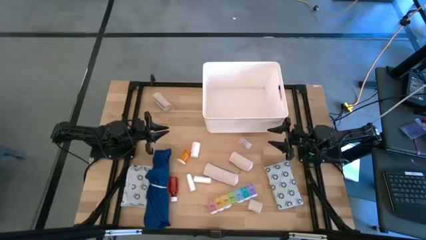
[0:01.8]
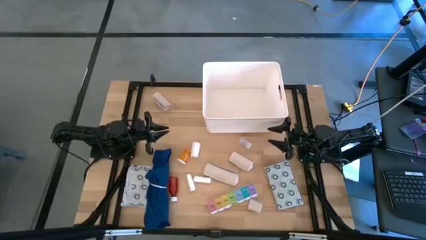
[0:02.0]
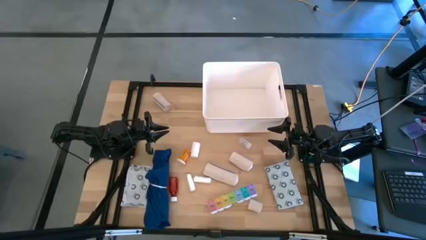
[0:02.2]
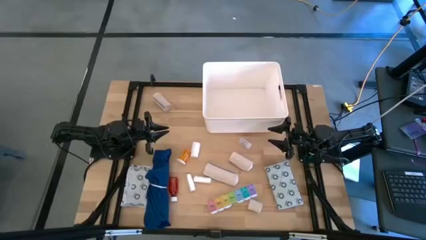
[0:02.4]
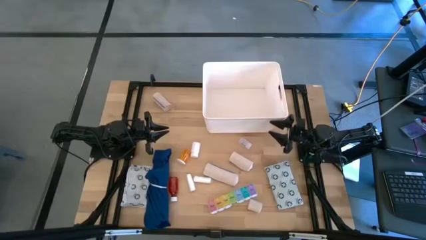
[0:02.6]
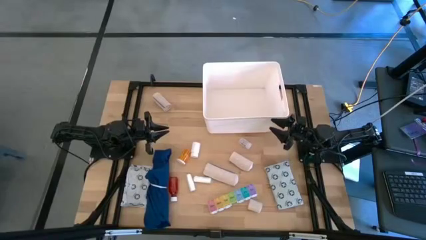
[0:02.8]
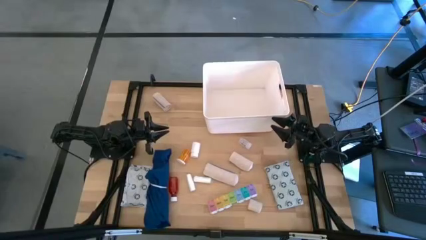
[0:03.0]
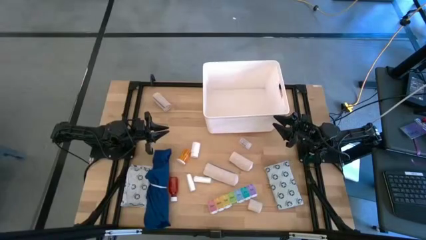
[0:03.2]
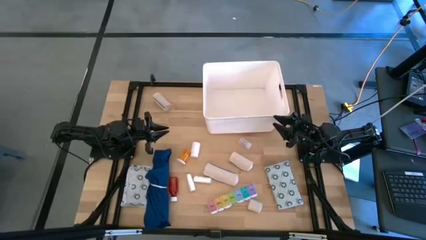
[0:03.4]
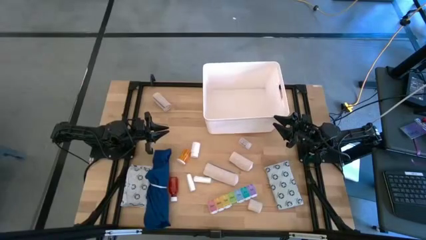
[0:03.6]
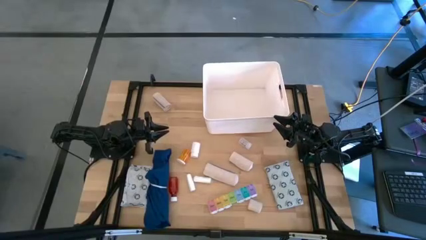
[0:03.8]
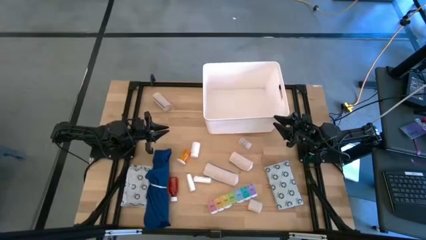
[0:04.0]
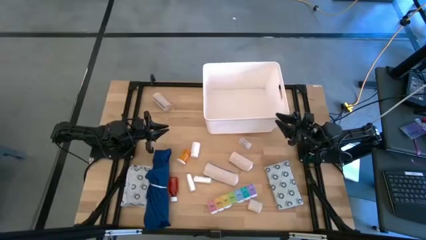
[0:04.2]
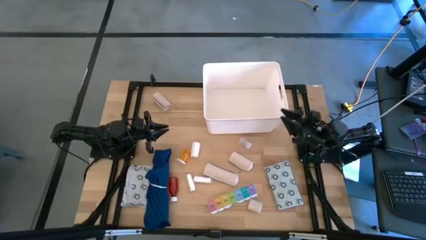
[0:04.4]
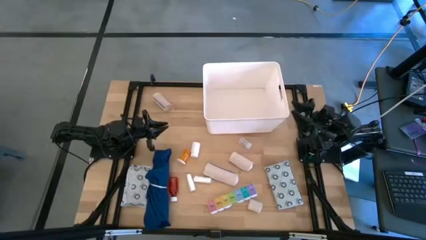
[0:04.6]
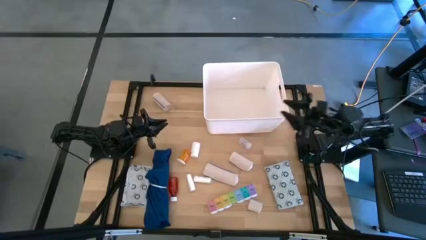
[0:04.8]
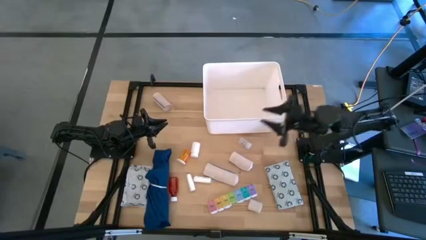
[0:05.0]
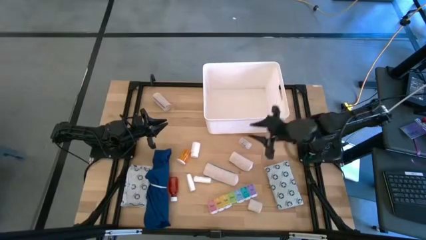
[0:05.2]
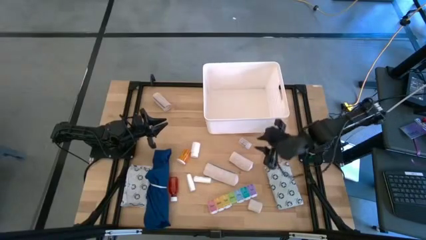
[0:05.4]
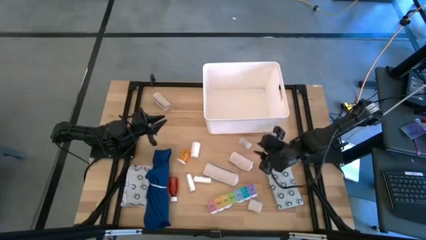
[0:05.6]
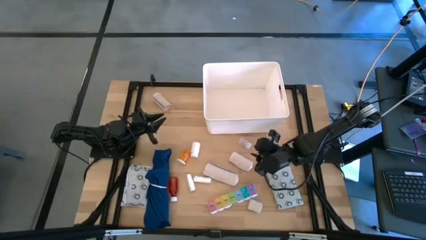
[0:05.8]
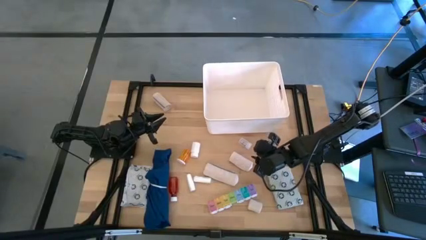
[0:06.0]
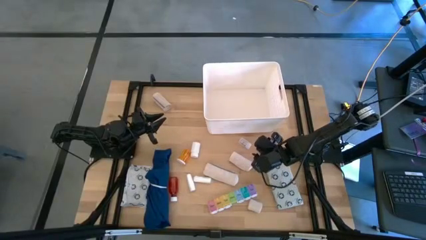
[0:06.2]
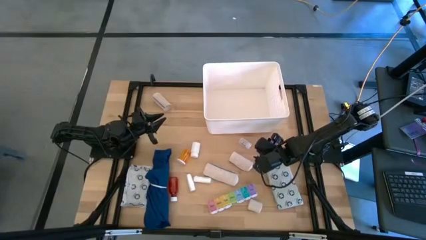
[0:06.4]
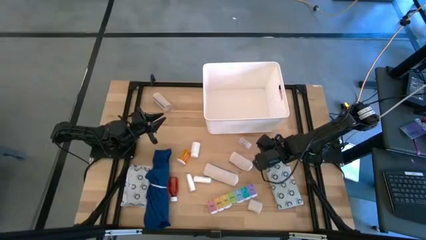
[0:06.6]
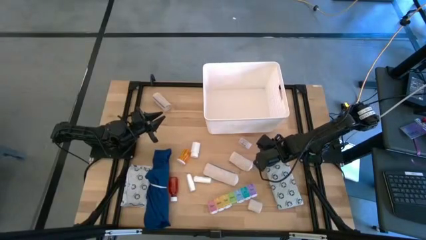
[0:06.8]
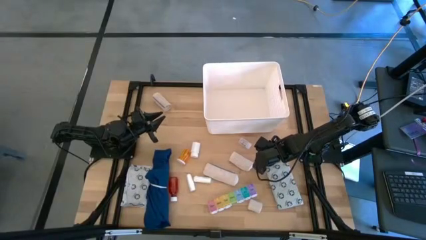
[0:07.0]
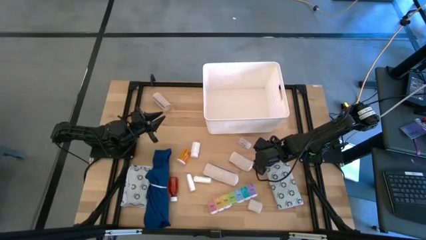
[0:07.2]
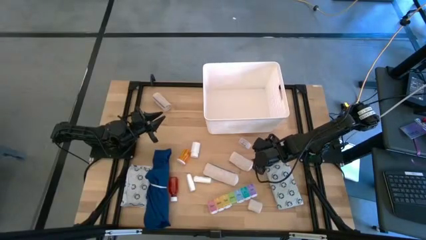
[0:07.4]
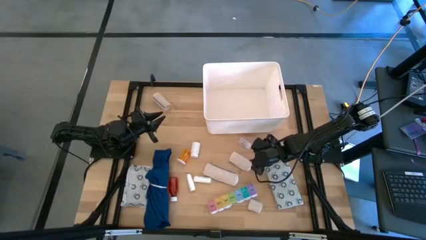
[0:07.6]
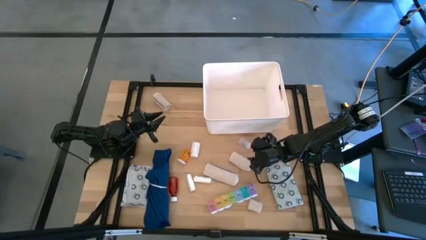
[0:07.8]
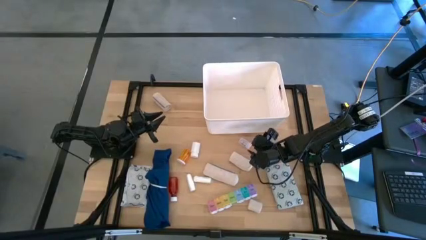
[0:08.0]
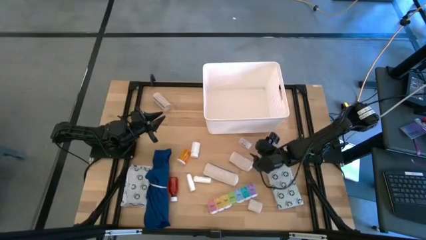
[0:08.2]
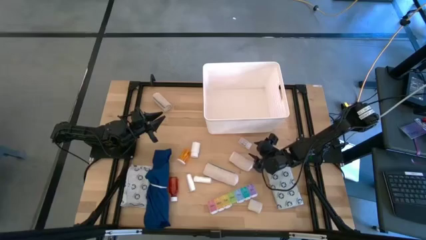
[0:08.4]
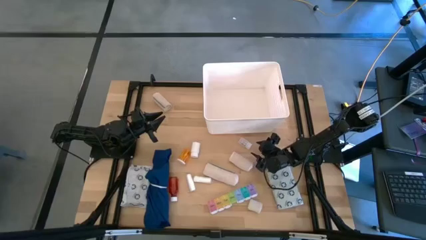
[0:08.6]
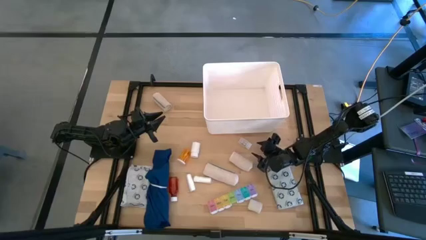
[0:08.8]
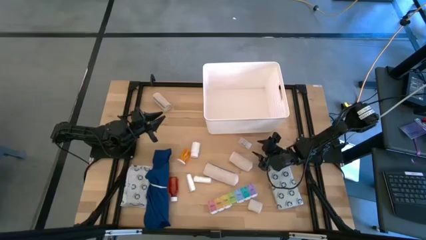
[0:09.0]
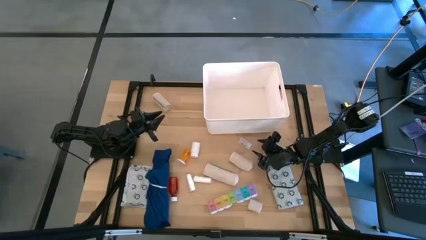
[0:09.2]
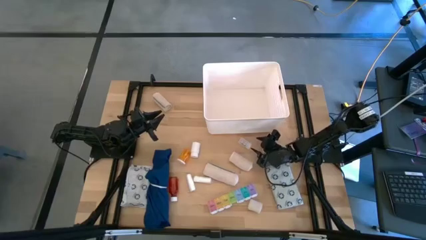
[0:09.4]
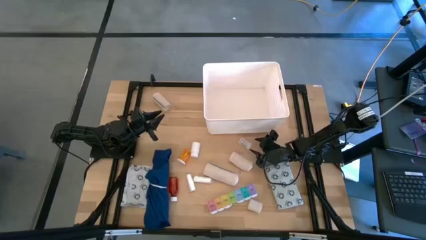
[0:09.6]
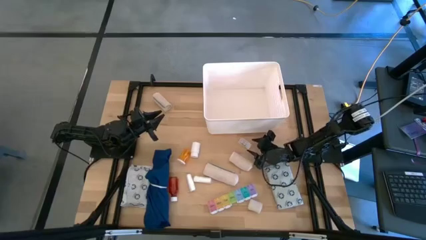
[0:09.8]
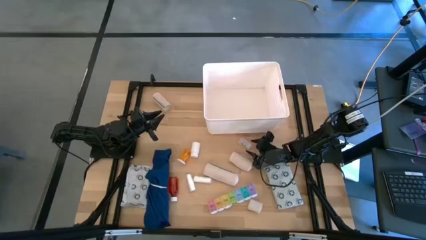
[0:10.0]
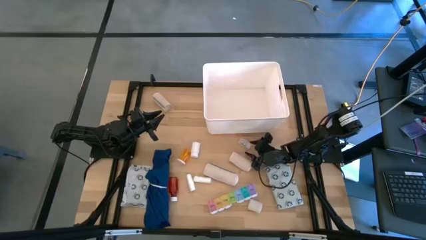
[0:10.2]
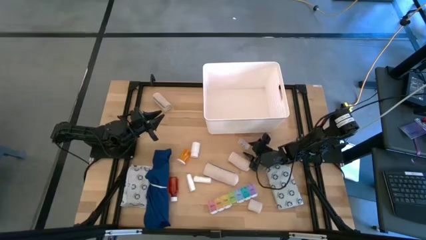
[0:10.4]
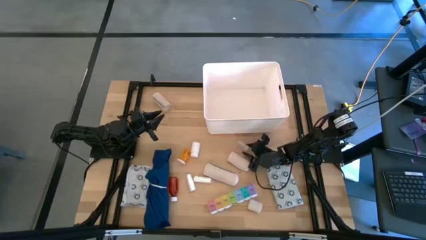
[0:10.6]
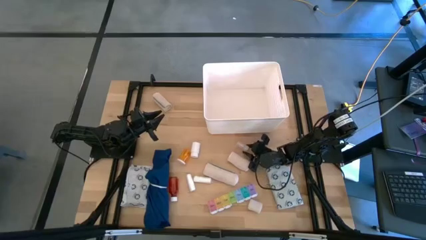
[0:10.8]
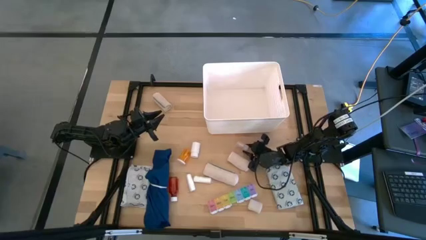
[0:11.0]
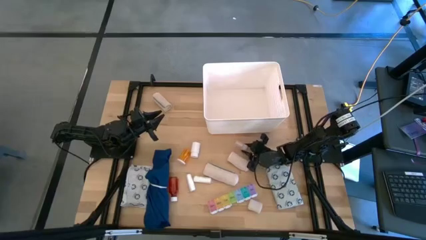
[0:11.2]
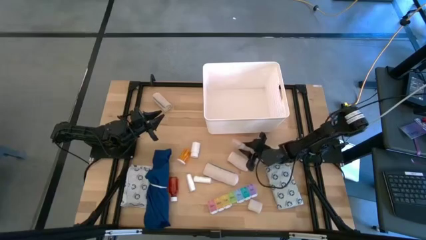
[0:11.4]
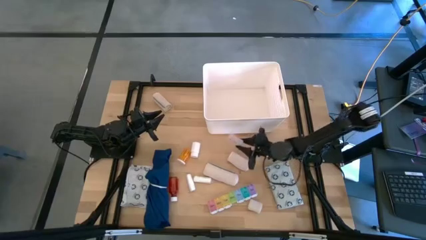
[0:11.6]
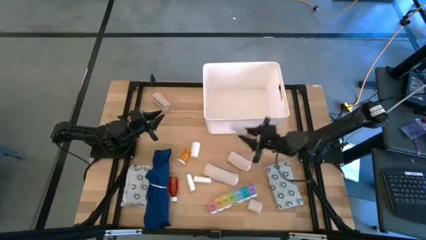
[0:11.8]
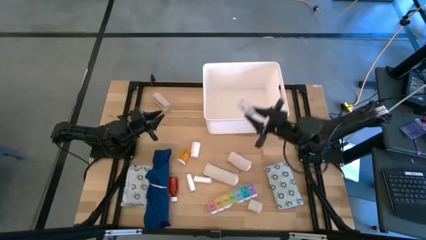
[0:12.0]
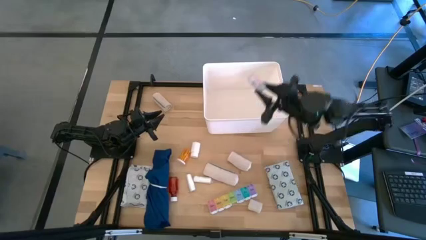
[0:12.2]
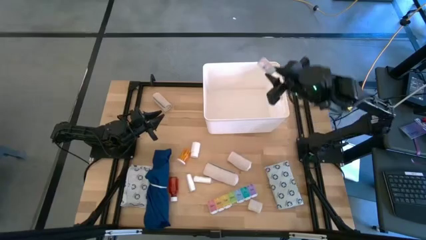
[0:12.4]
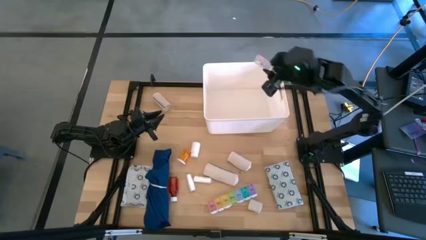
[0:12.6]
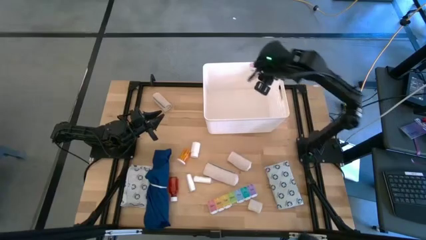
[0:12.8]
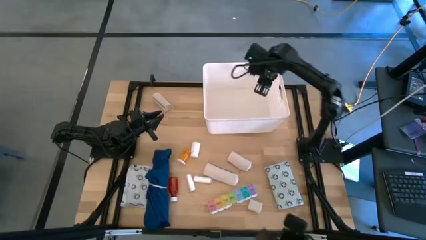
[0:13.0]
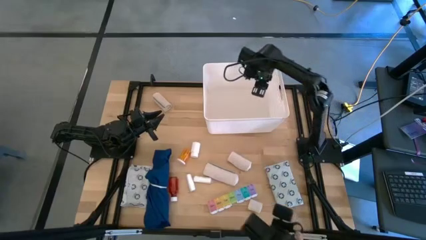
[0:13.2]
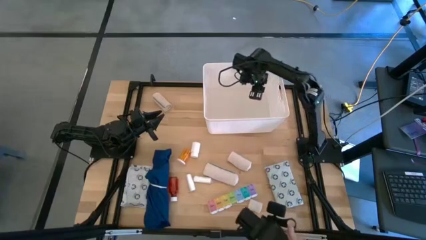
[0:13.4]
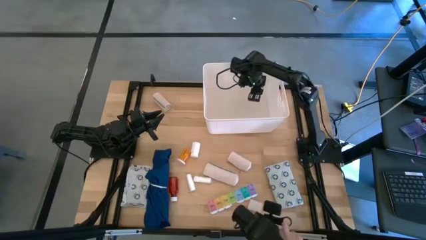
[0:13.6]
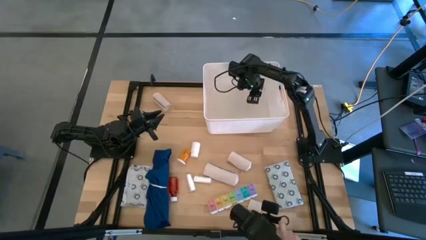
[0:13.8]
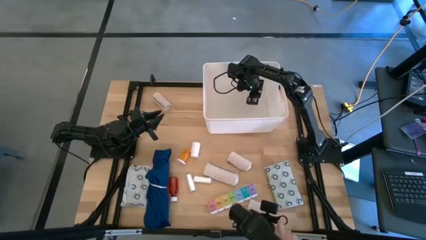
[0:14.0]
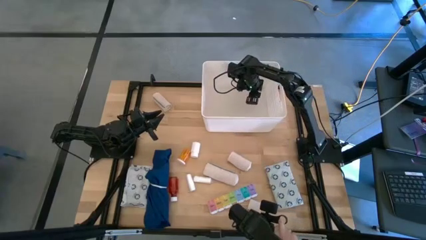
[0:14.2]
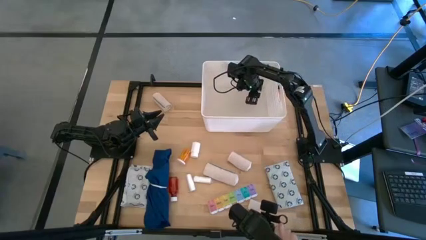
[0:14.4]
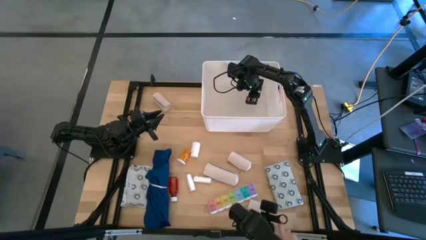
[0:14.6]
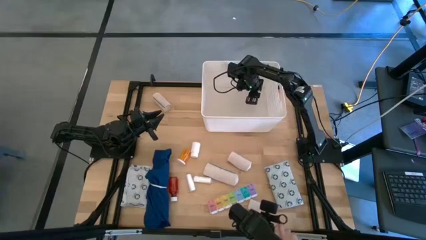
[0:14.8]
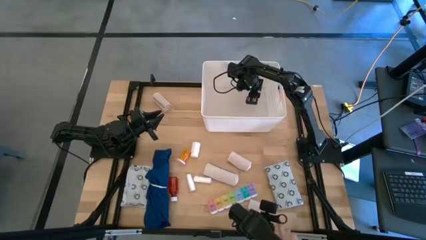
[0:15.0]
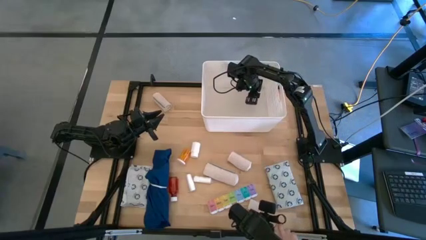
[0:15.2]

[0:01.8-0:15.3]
Task: Pick & place medical supplies in basket/bin
Put the transparent pill bottle into the white container

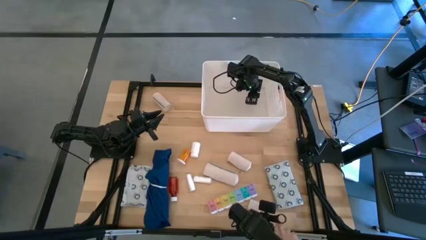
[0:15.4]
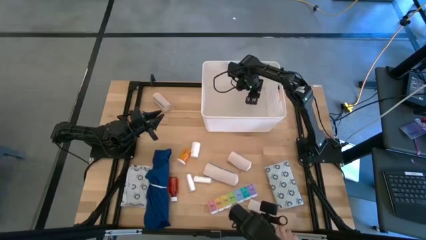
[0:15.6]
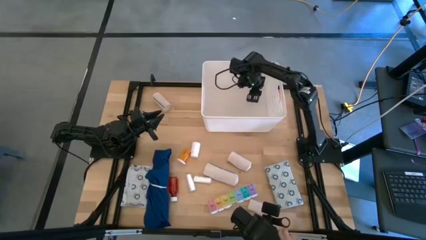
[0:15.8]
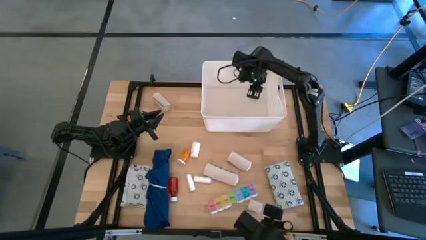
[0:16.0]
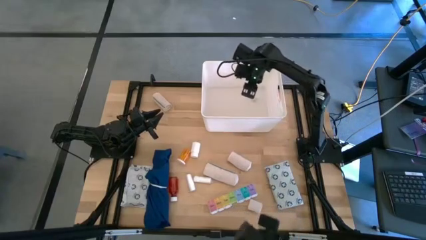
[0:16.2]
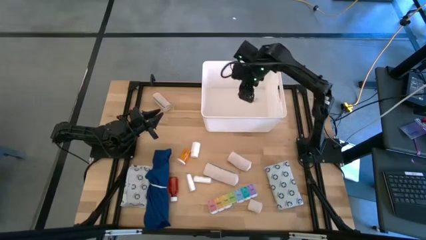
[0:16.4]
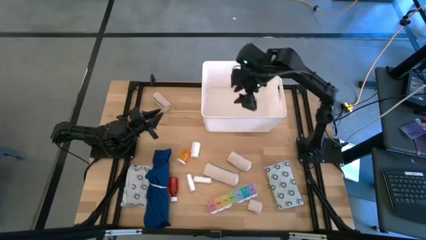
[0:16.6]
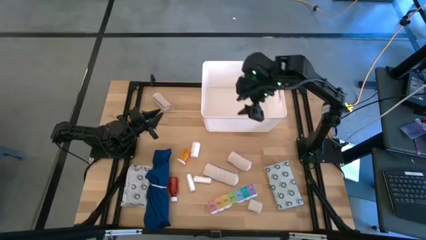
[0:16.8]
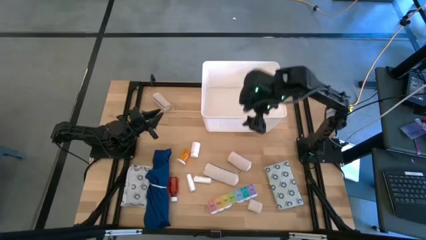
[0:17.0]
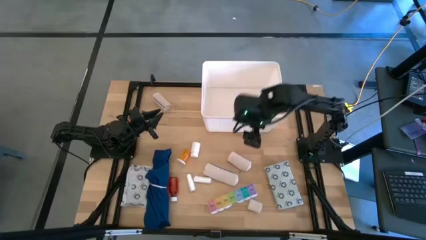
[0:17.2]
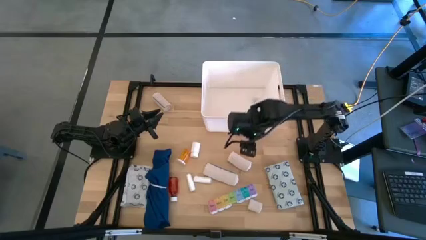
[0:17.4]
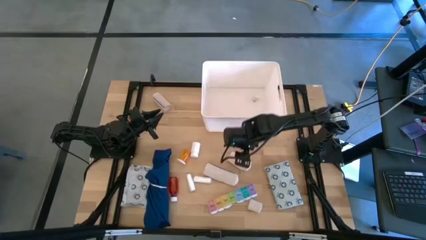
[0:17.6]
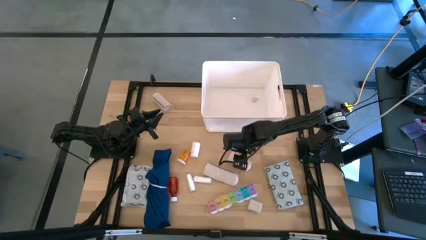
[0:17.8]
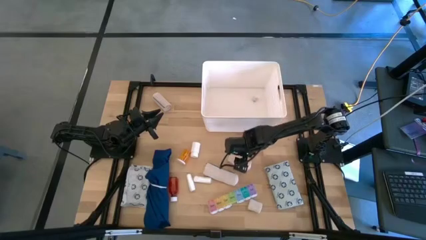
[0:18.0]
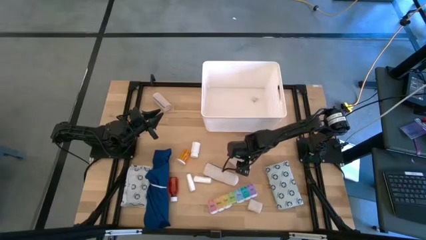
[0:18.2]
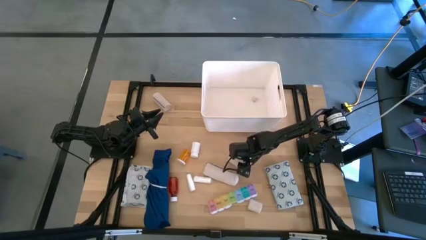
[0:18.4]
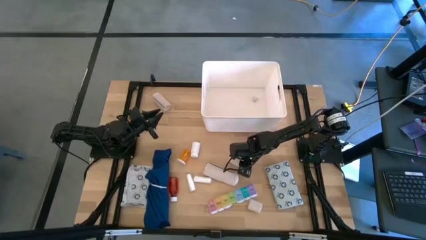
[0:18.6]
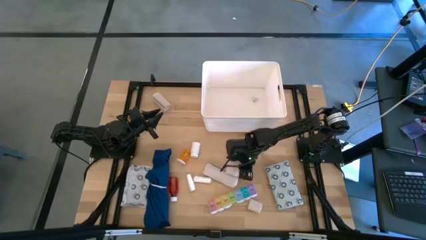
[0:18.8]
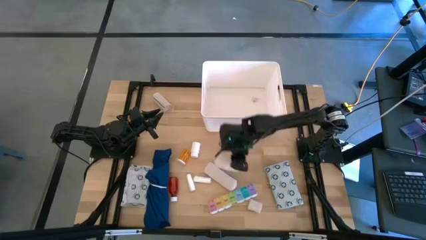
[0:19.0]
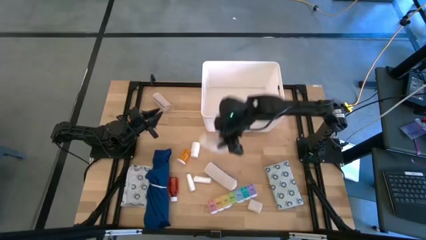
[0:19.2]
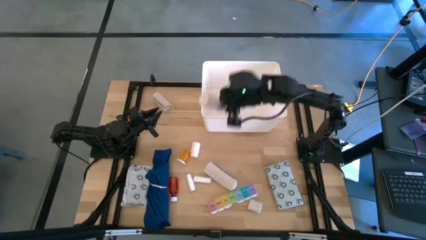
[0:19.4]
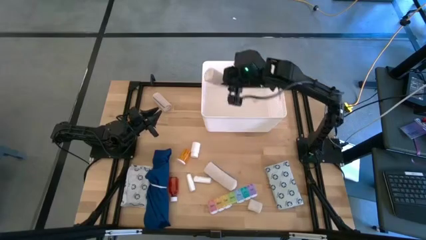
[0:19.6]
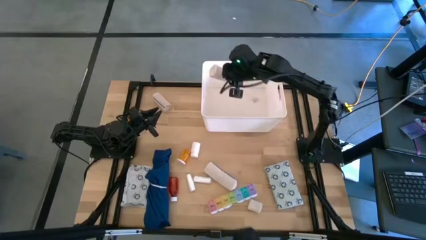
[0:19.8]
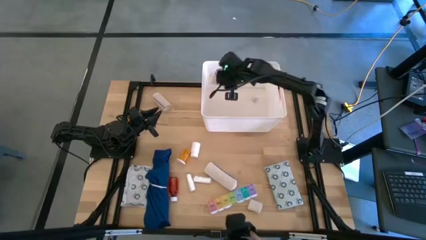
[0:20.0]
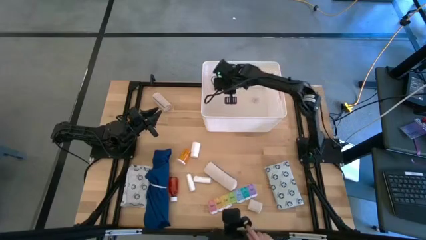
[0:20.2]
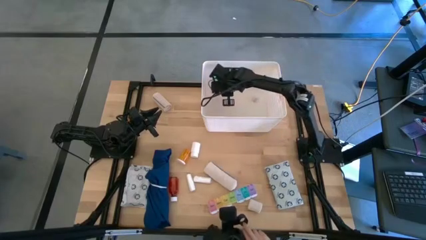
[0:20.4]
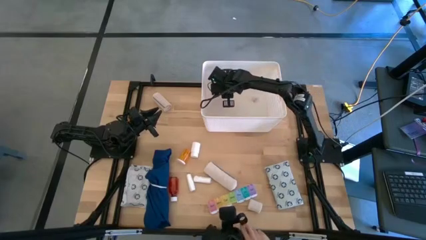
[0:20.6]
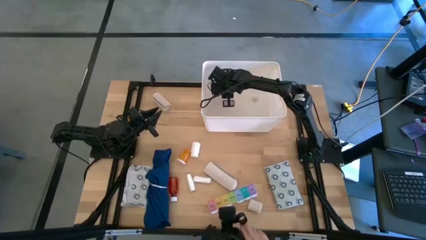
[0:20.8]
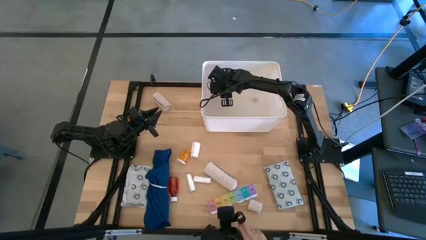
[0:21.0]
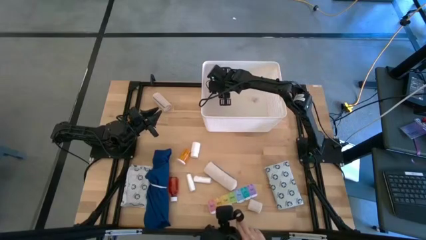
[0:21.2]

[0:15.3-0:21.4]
Put the rolled brown bandage into the white container
